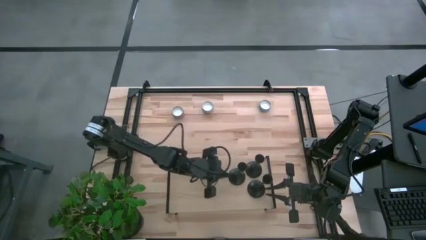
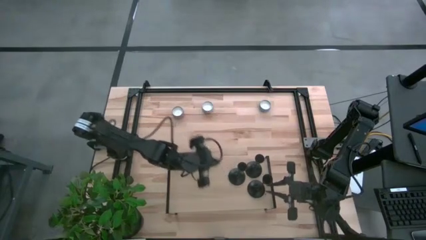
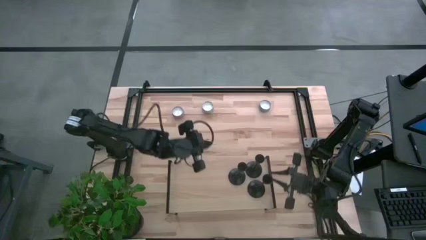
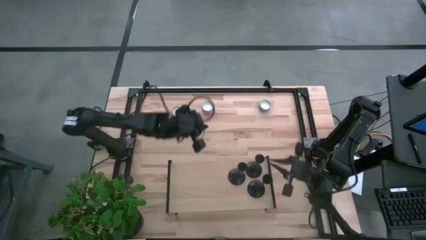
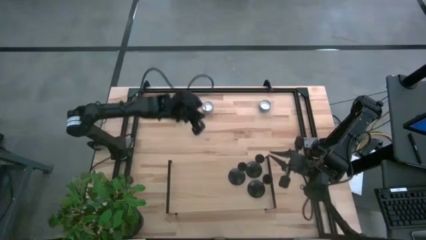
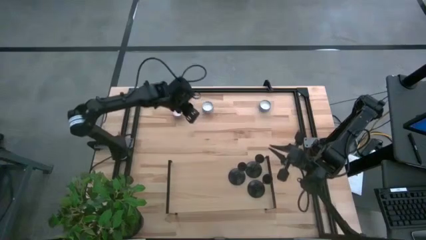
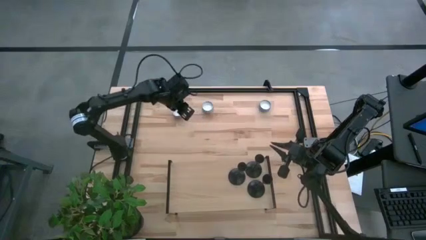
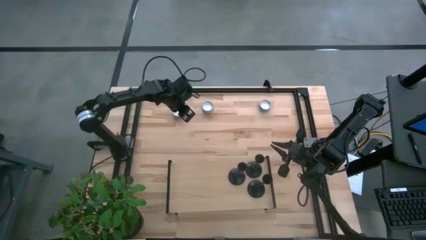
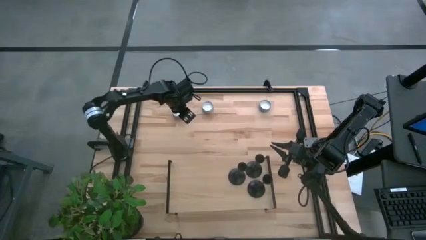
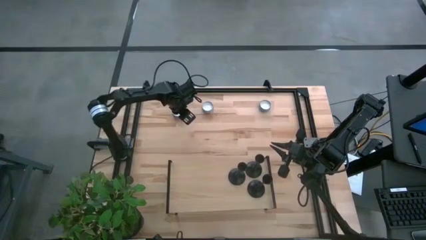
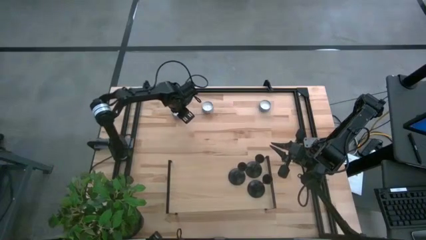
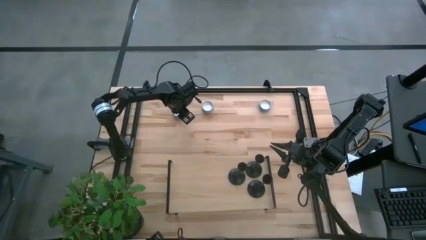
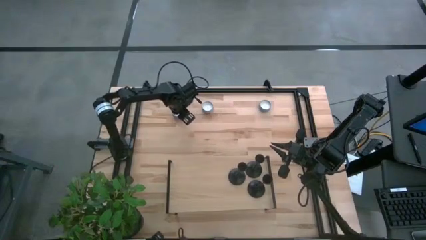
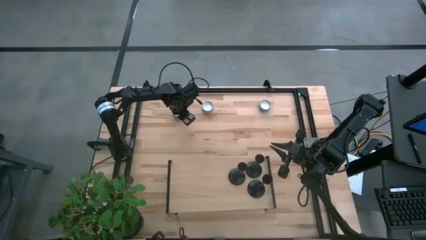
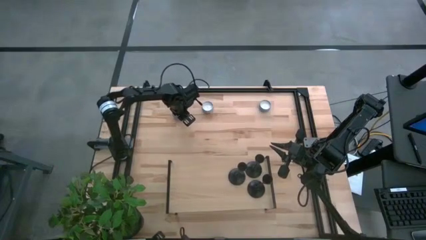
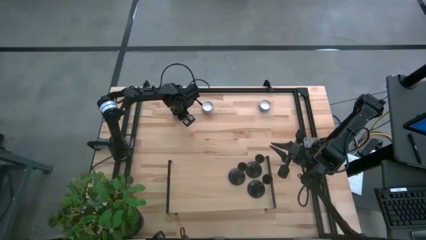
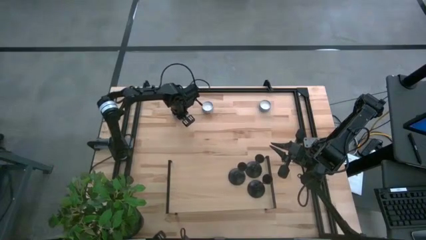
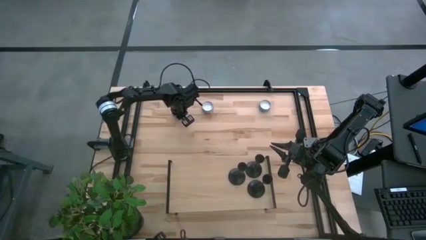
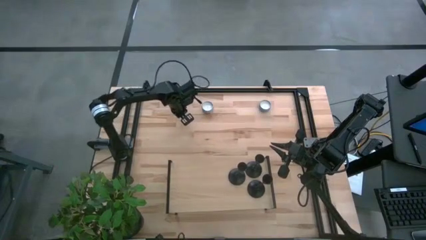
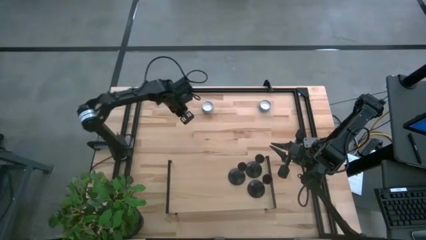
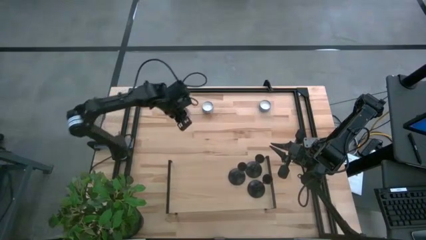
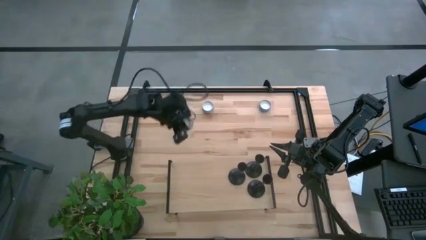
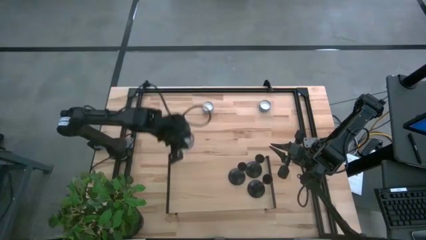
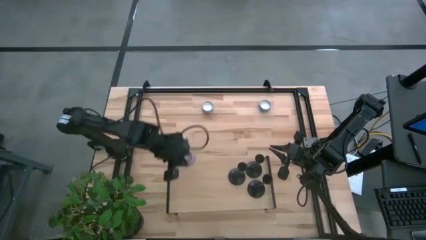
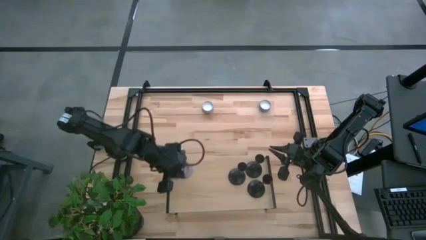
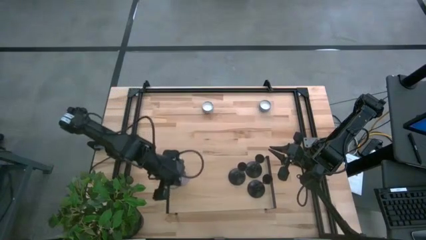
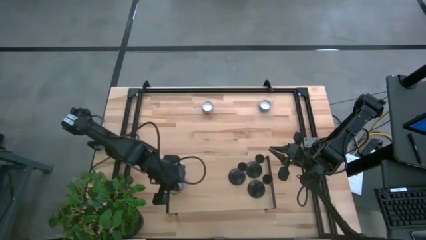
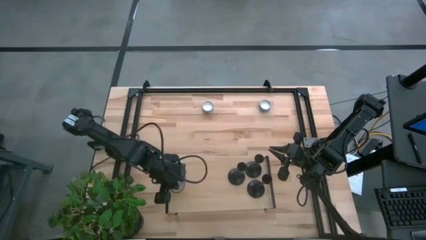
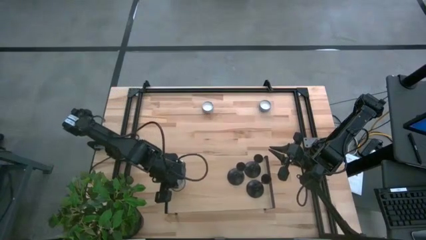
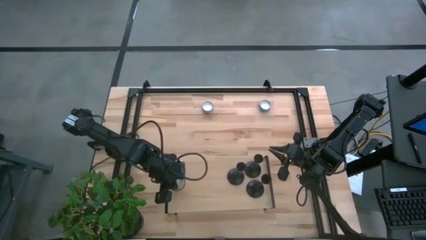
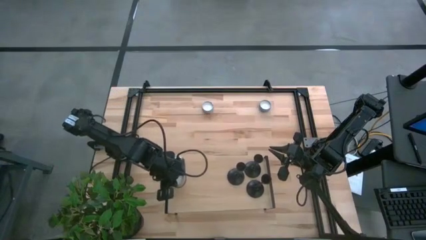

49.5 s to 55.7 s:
Task: Pick & Place candle stick holders
Put the left scented candle on the shelf

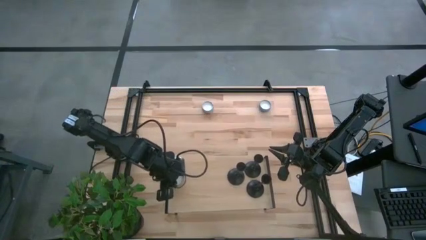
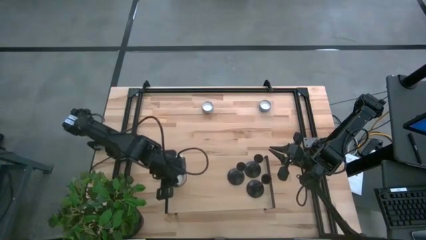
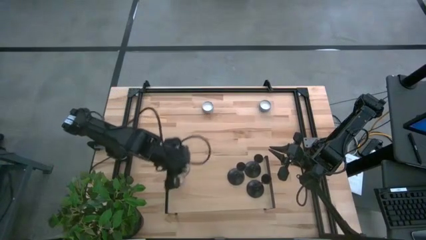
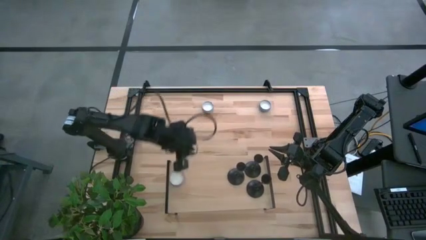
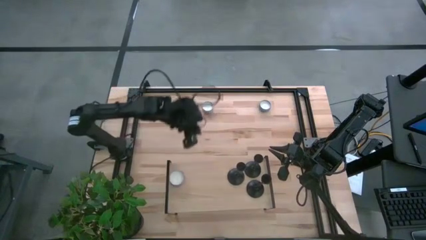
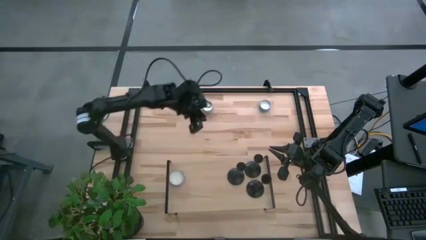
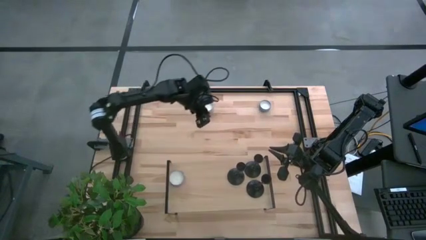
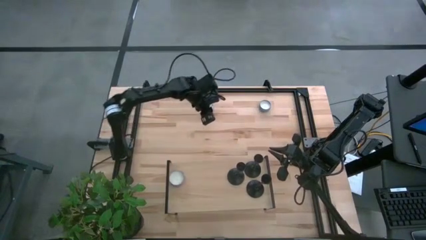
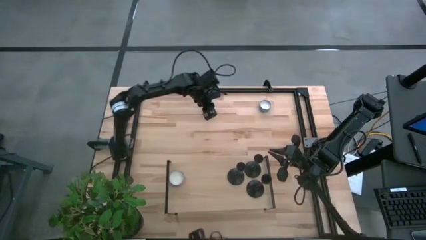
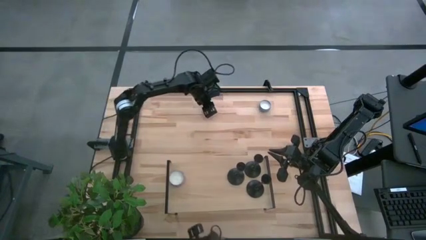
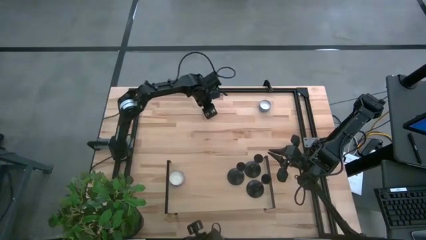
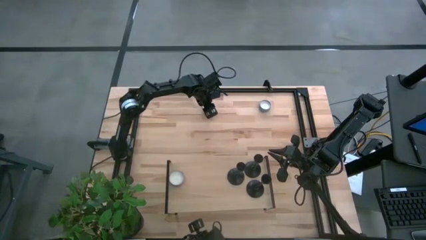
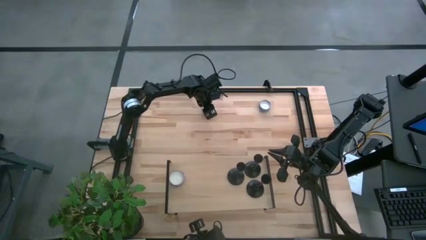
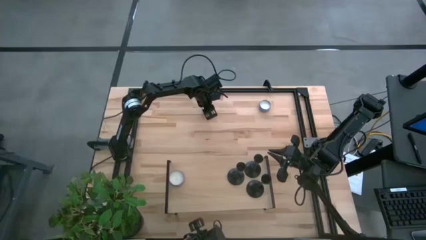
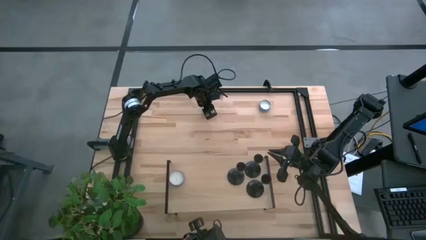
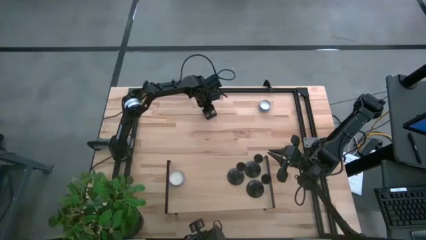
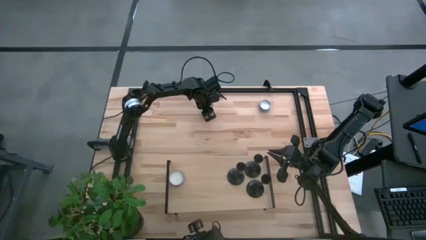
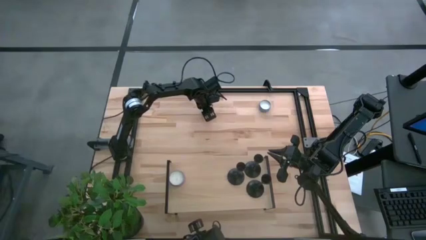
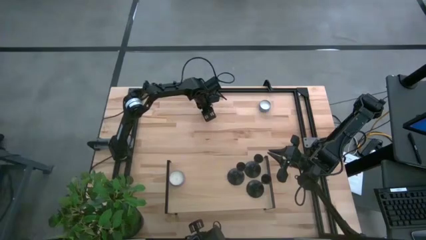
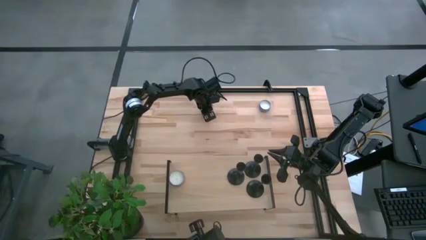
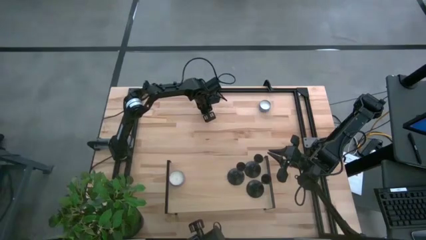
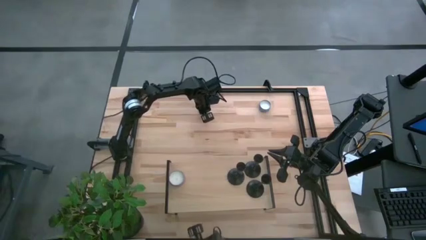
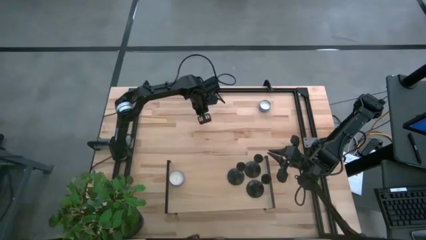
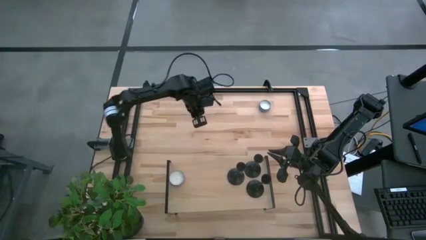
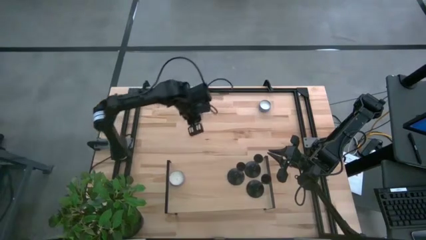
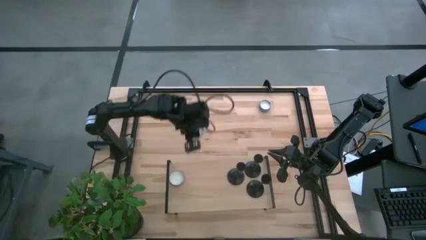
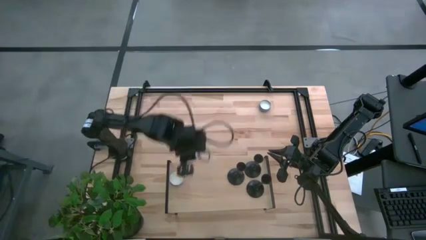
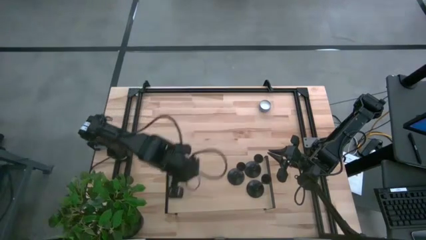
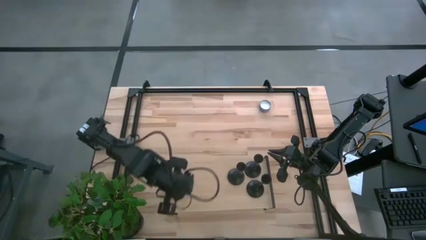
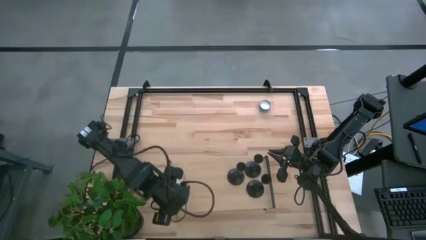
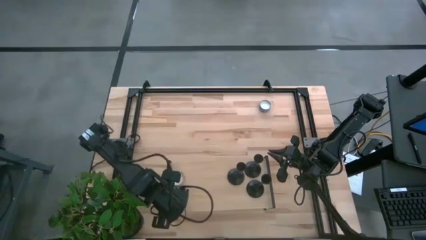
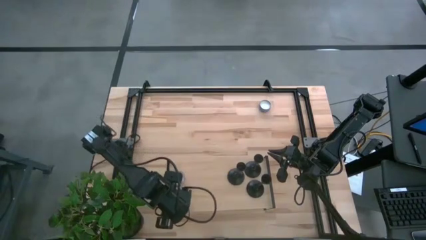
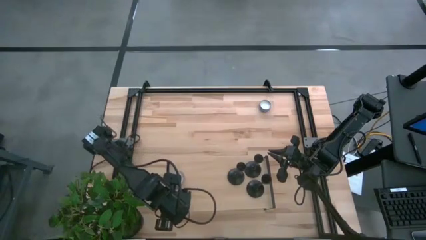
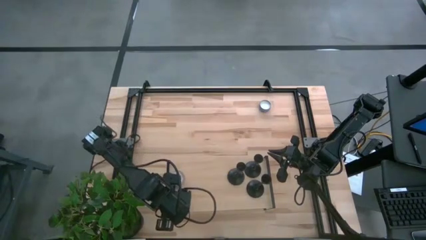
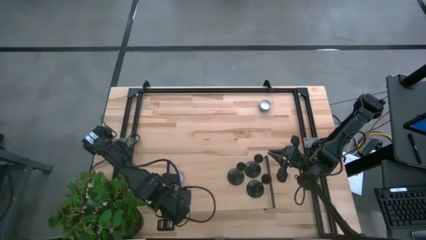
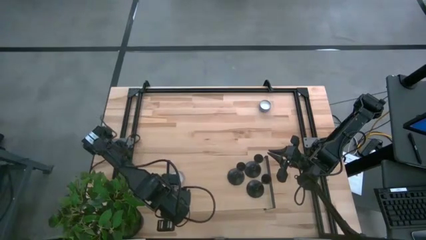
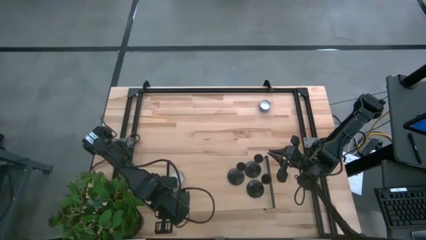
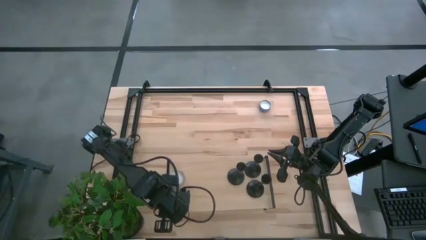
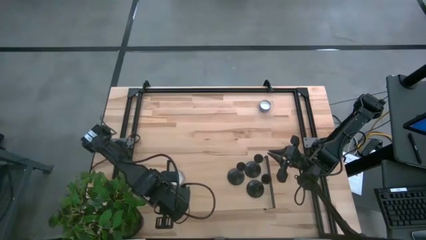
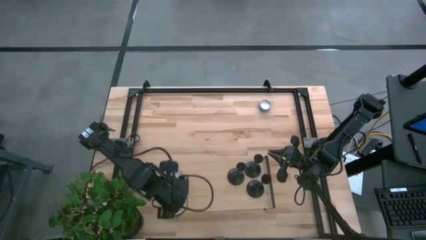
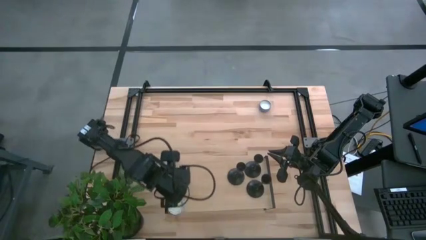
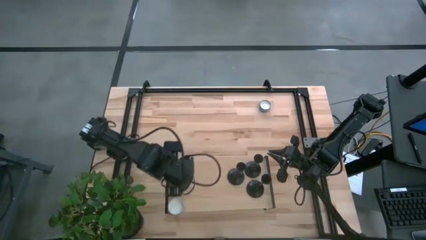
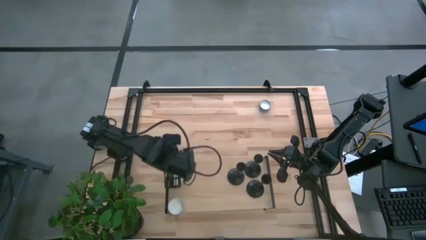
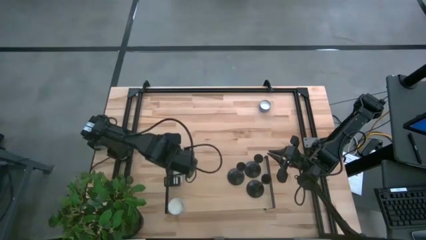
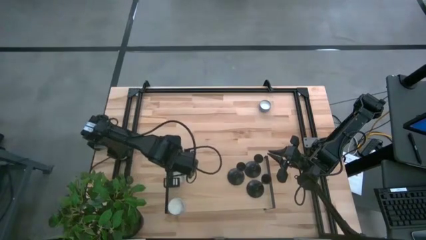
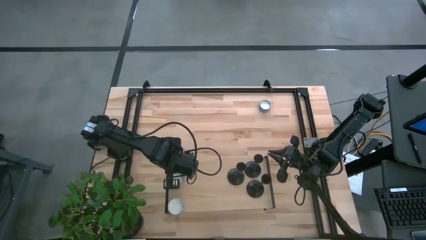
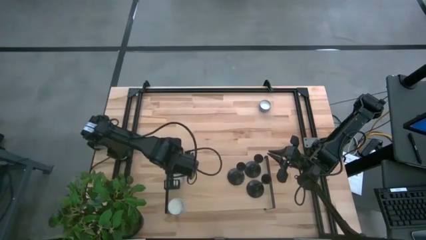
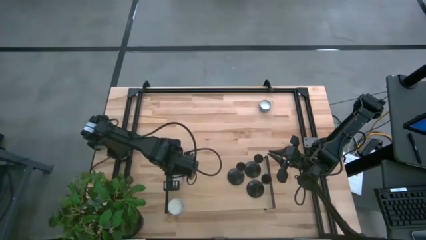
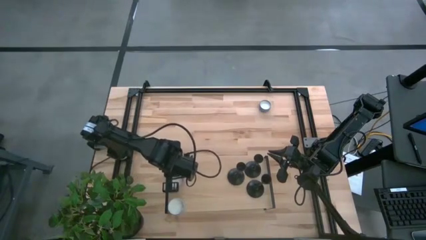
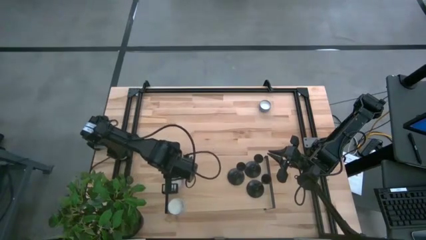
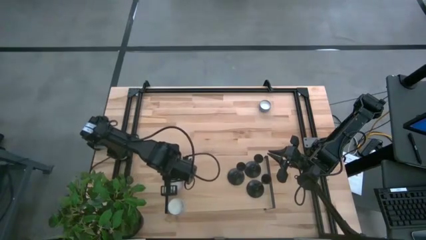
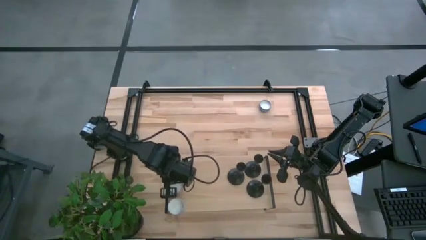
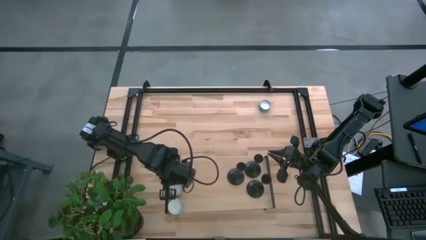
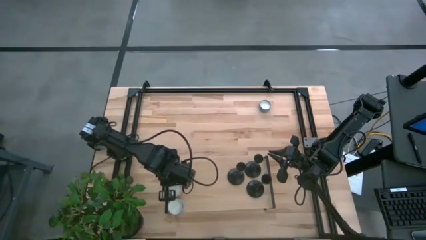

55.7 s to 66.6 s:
Put the left scented candle on the shelf
